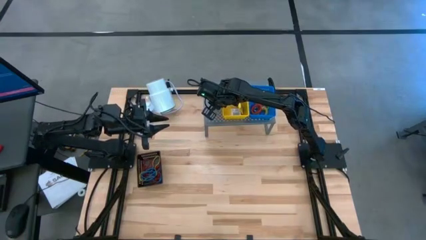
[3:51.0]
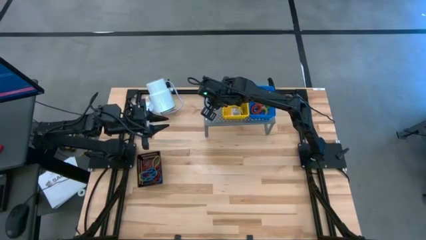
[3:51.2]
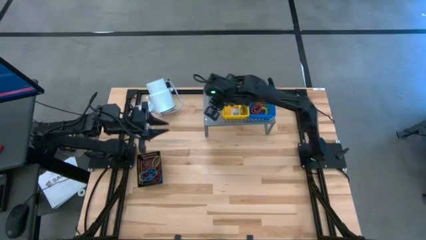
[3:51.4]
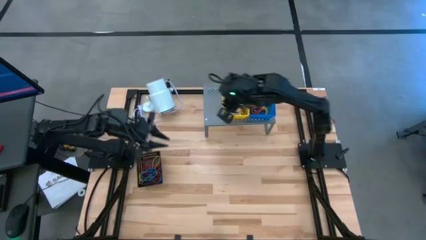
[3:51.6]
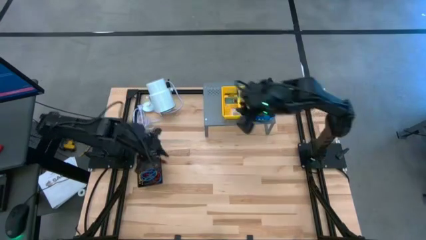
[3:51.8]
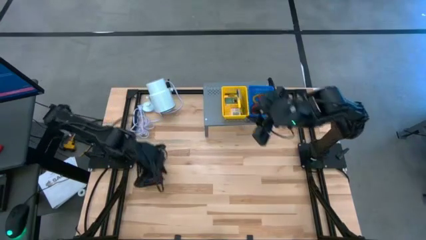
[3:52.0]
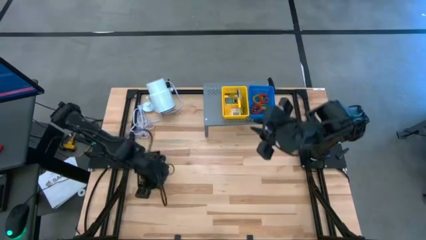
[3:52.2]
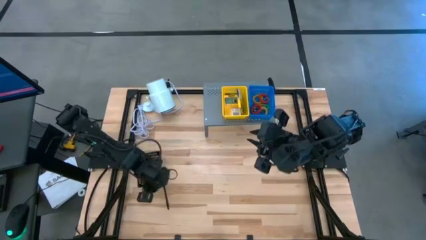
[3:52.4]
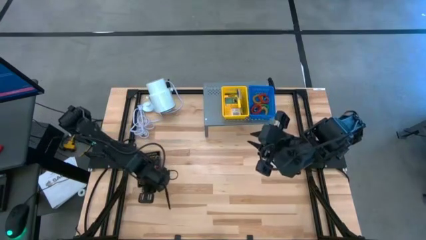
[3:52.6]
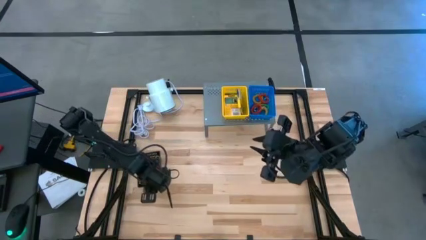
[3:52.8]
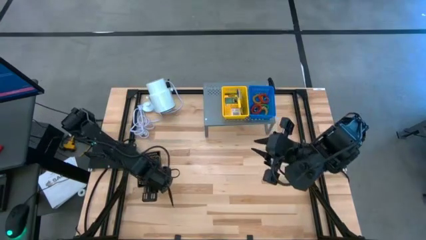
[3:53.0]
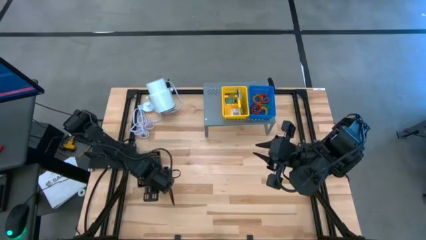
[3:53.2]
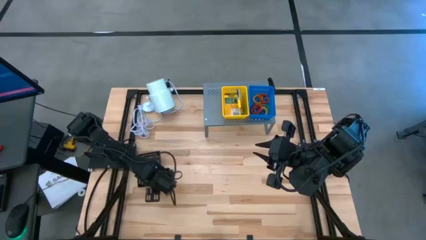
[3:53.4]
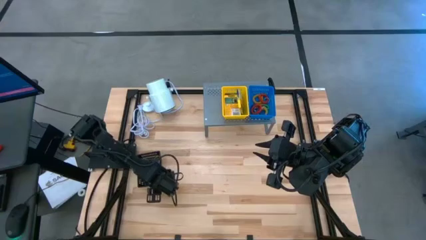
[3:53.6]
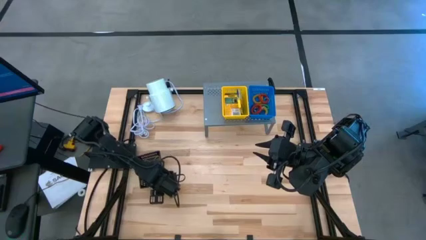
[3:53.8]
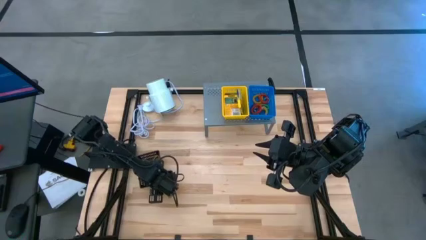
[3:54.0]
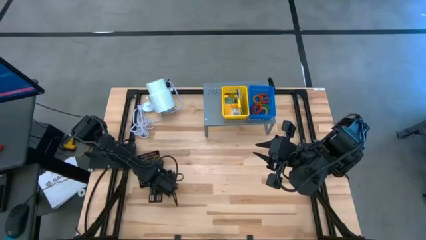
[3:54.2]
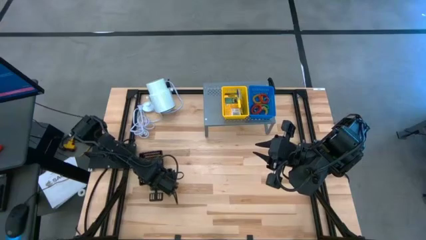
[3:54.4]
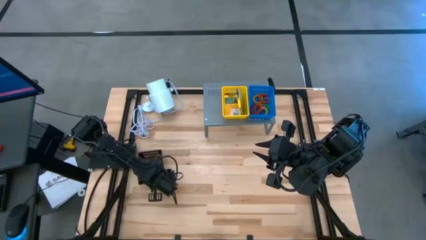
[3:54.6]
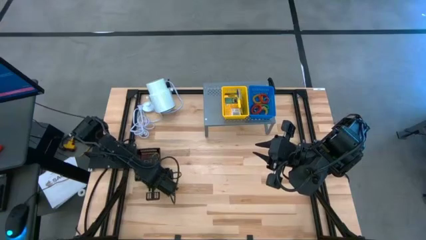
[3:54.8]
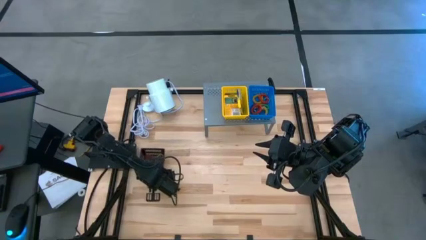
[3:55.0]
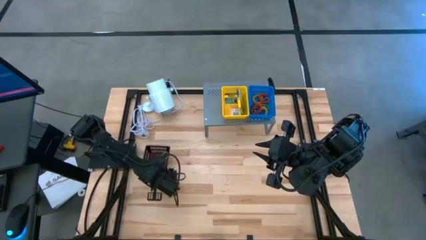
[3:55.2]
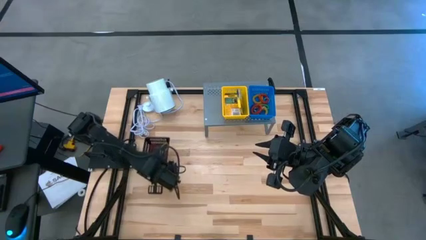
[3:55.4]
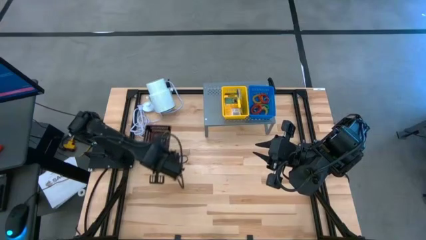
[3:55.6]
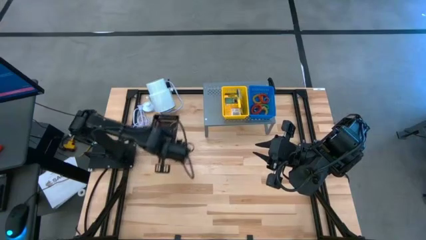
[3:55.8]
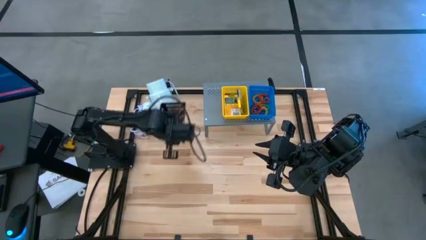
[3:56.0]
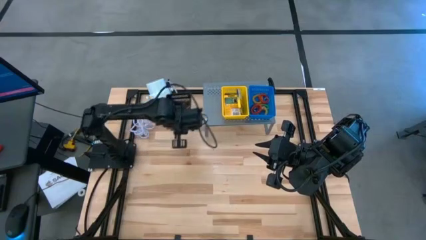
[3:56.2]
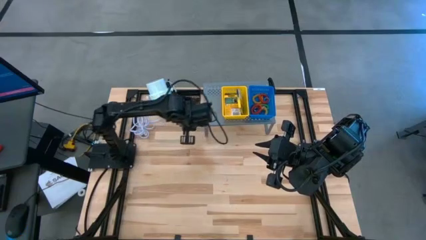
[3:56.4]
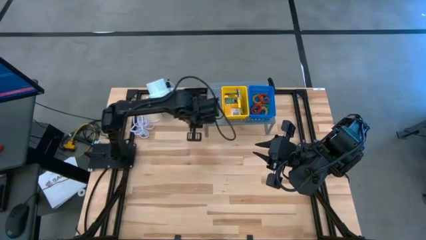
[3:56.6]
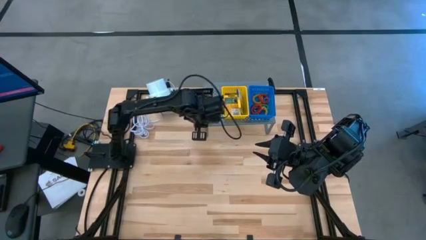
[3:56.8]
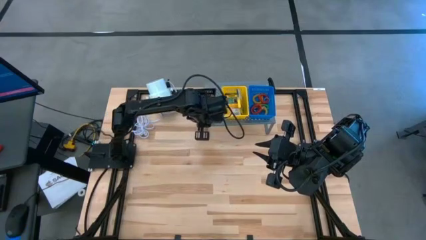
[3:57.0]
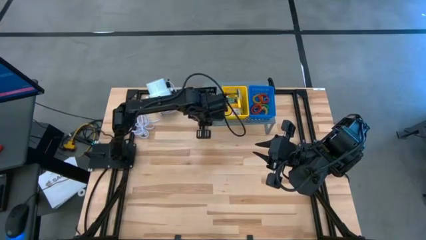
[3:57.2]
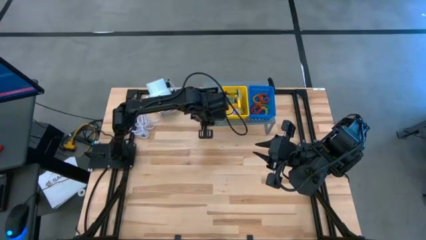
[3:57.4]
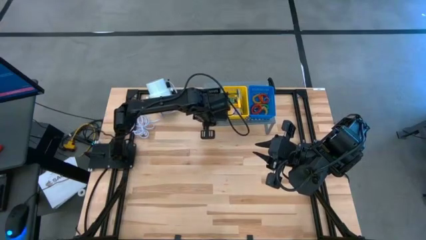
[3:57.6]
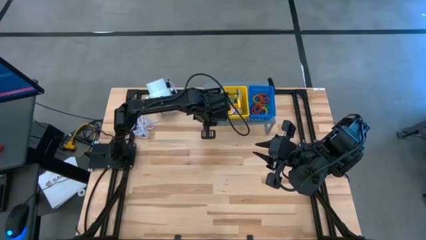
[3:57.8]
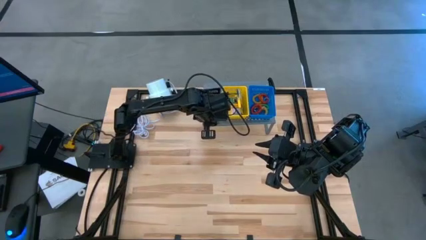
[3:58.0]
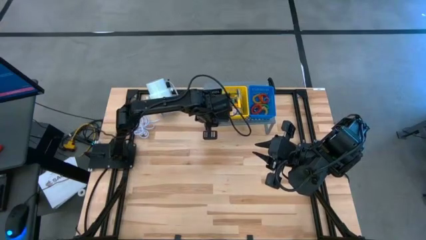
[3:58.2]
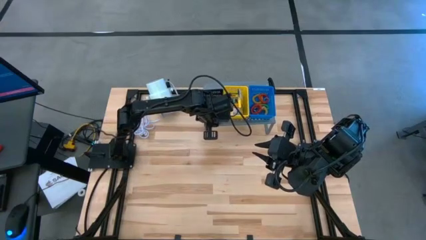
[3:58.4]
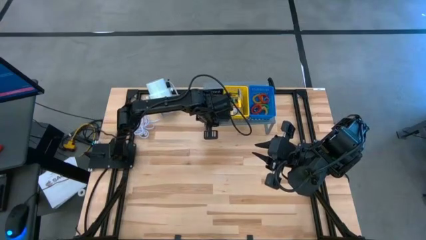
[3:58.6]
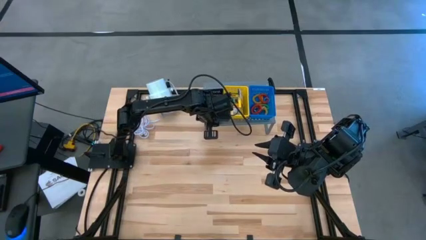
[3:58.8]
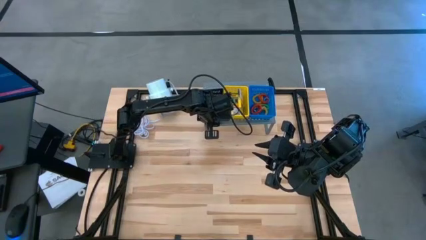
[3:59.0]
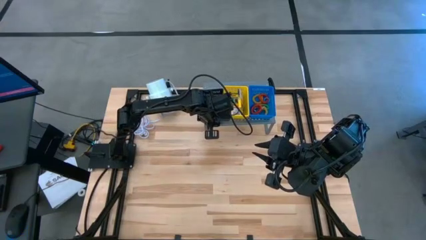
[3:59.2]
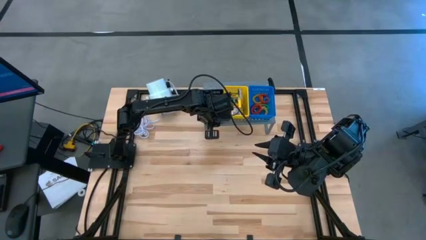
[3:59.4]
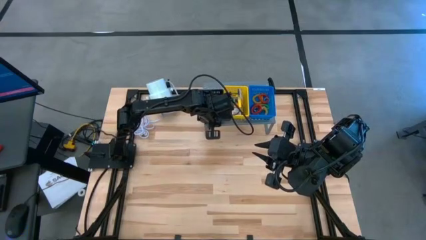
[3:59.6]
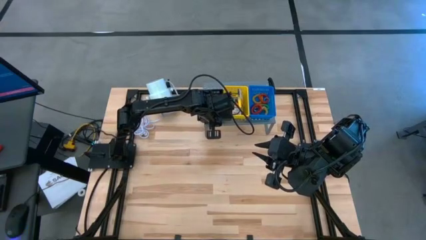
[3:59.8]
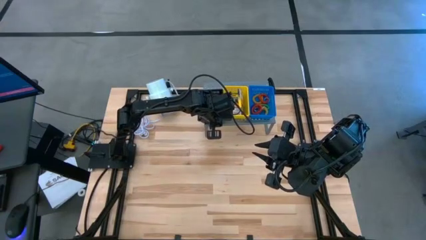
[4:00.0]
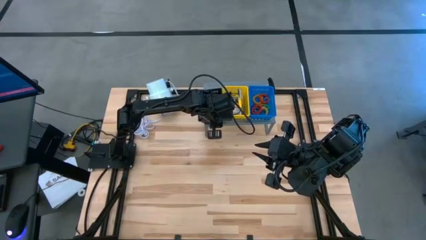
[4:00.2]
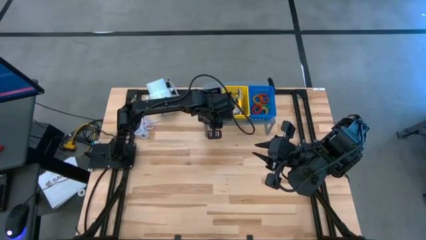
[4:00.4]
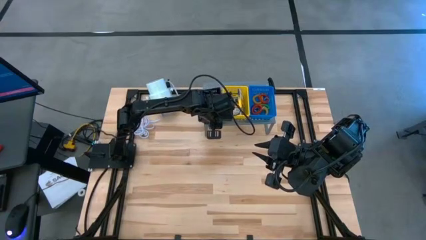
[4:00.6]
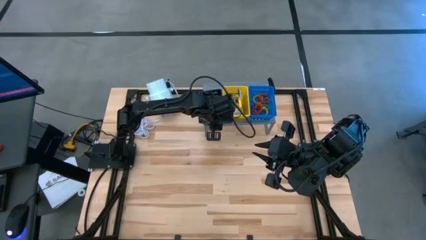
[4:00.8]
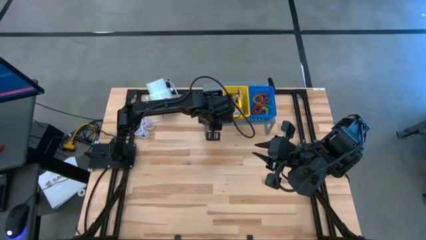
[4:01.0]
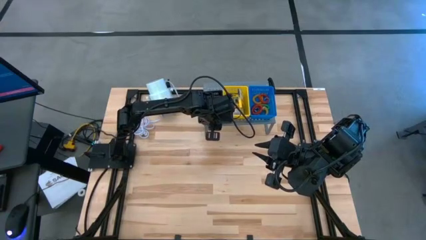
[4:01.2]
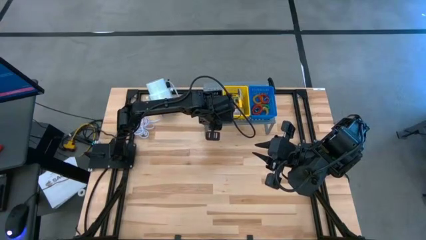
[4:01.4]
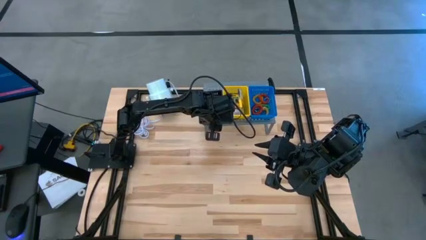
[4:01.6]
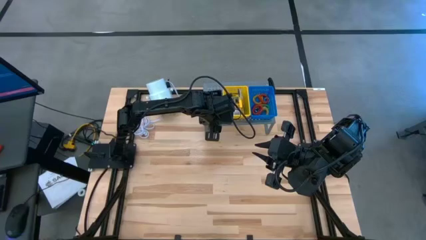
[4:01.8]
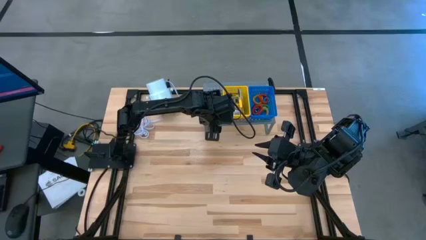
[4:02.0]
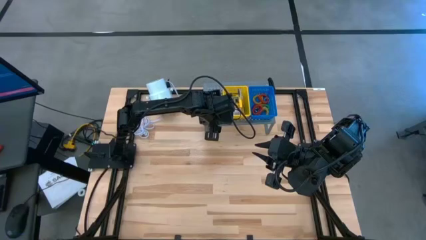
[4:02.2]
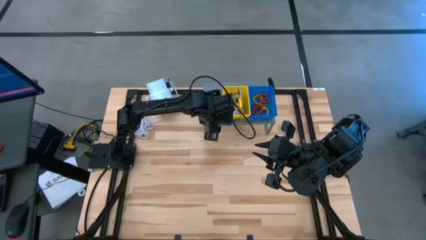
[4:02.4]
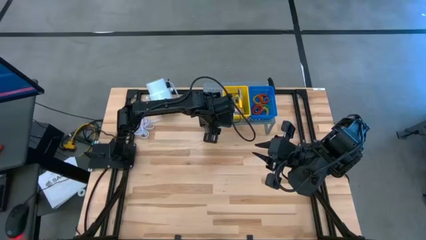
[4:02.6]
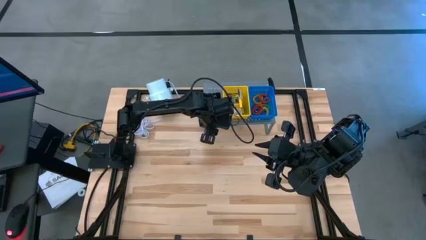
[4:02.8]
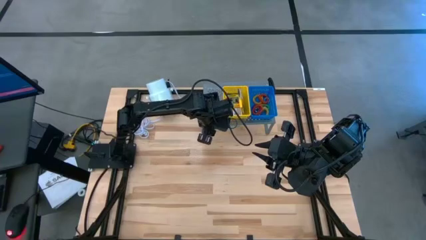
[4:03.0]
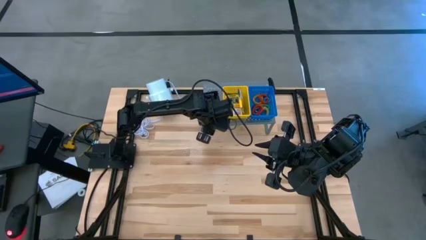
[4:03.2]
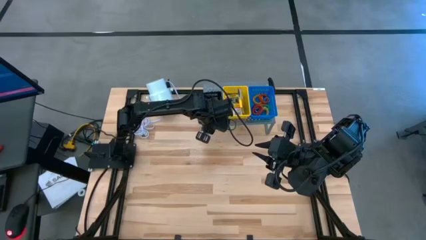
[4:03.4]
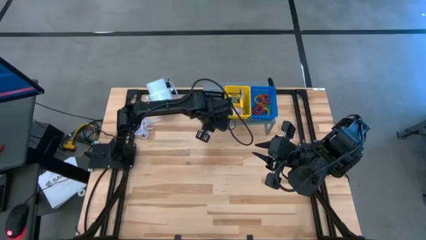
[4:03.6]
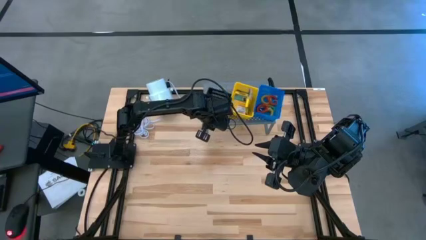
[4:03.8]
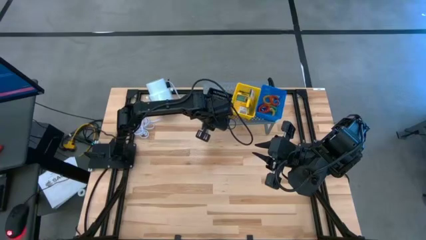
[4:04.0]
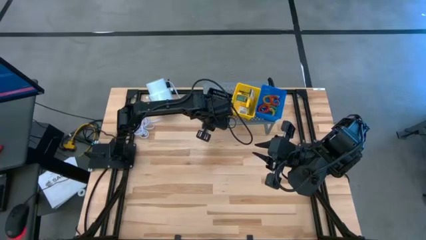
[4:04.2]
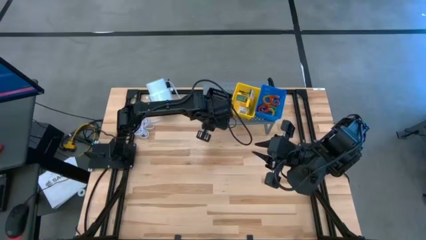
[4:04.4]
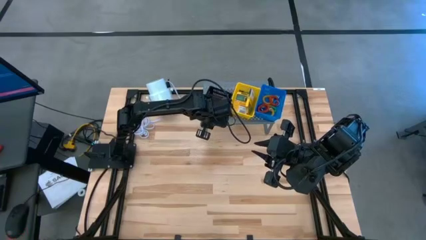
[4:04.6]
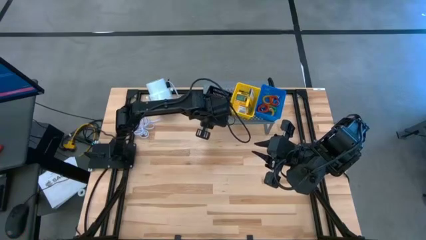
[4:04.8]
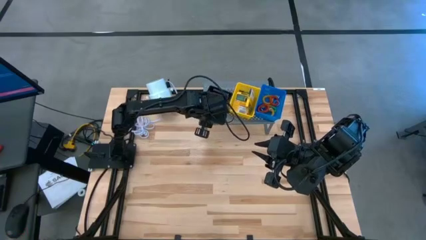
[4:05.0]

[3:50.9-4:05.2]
Task: Pick & Place Office Desk Supplies
Put the black bin on the shelf
